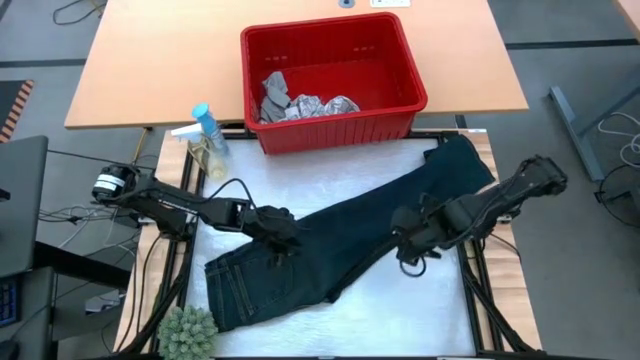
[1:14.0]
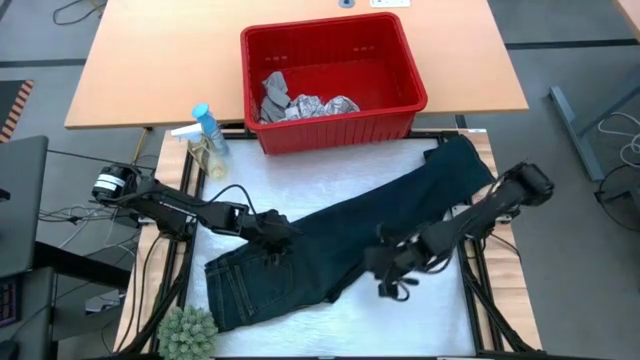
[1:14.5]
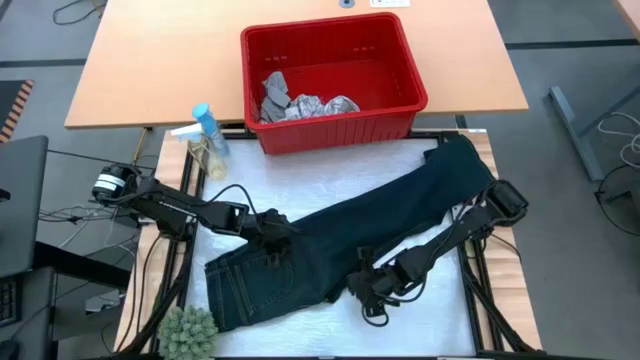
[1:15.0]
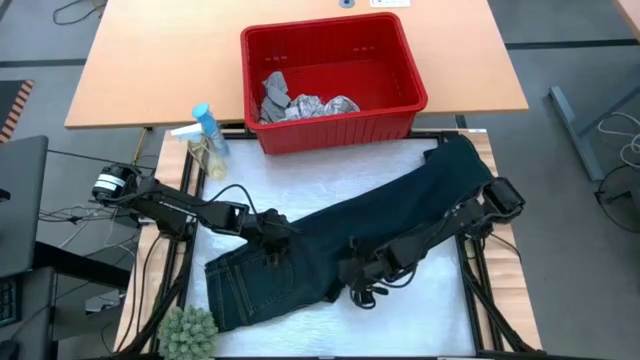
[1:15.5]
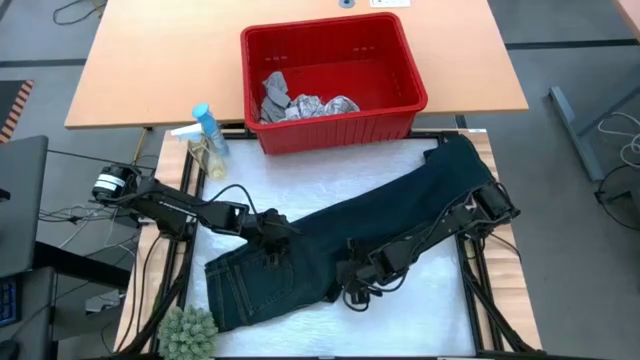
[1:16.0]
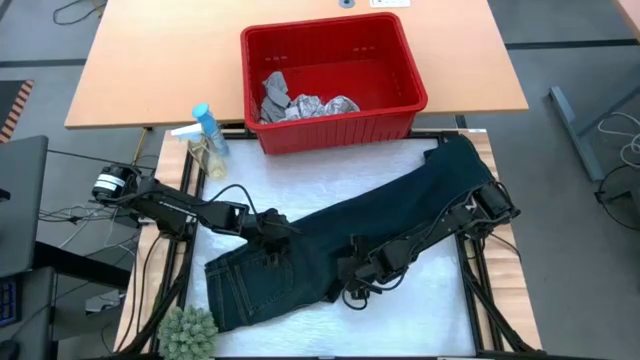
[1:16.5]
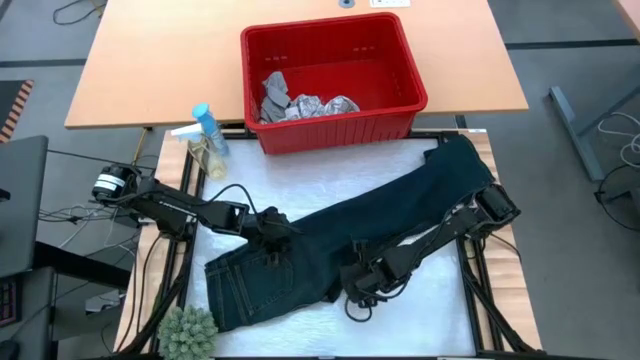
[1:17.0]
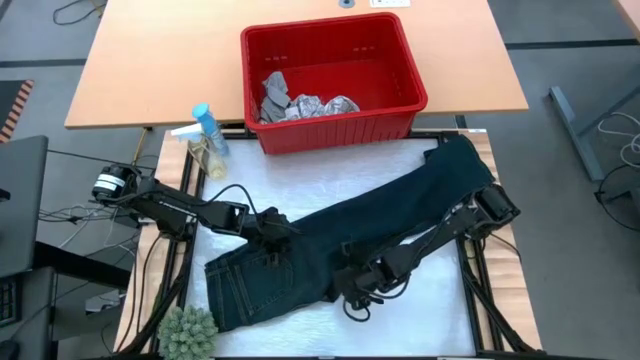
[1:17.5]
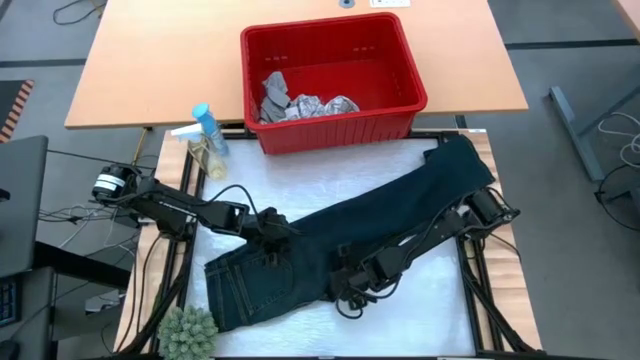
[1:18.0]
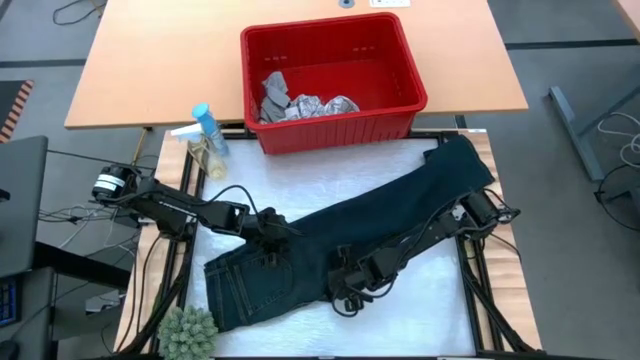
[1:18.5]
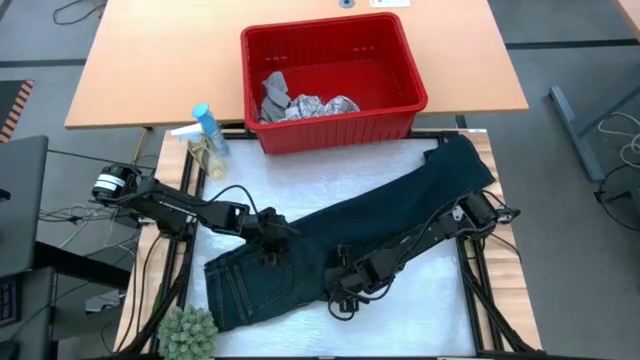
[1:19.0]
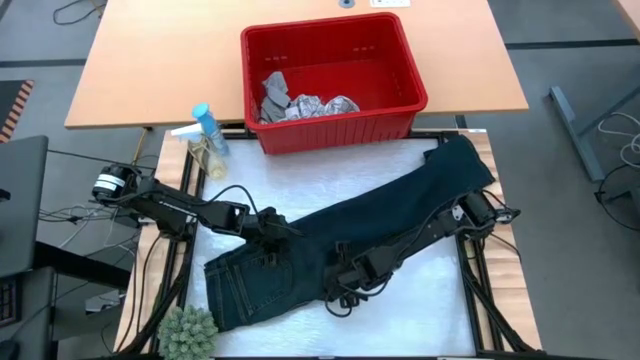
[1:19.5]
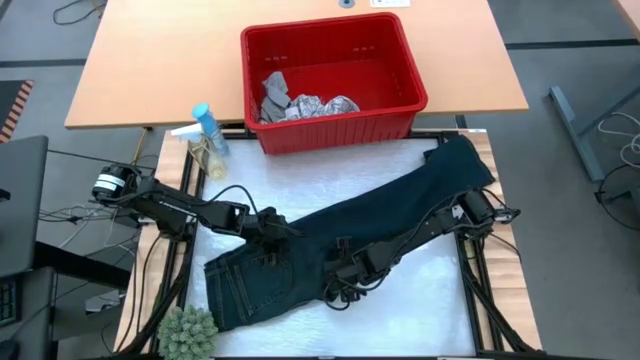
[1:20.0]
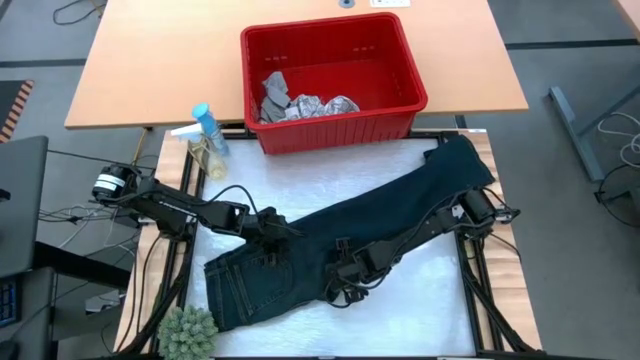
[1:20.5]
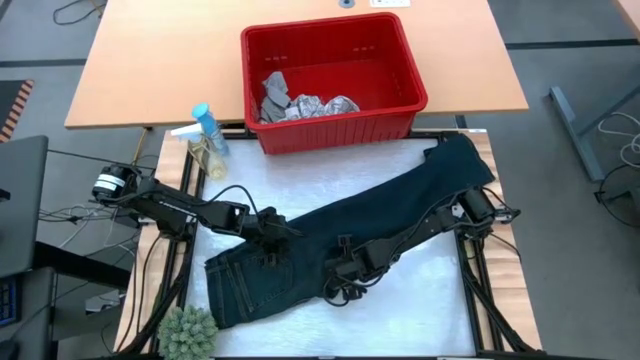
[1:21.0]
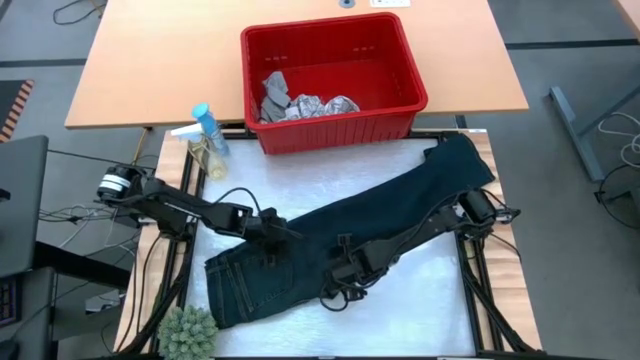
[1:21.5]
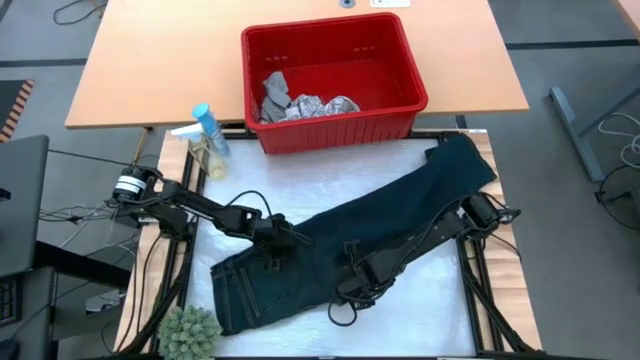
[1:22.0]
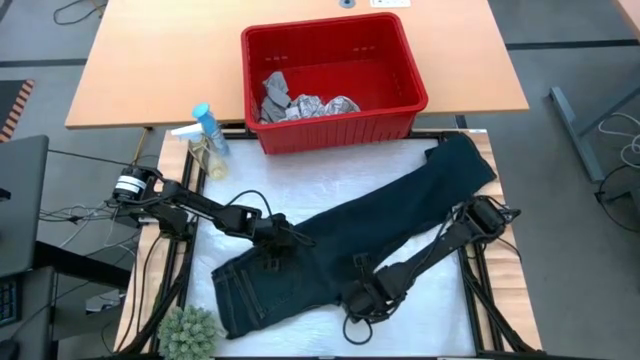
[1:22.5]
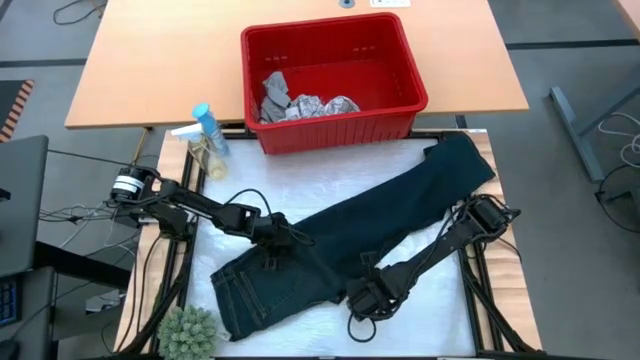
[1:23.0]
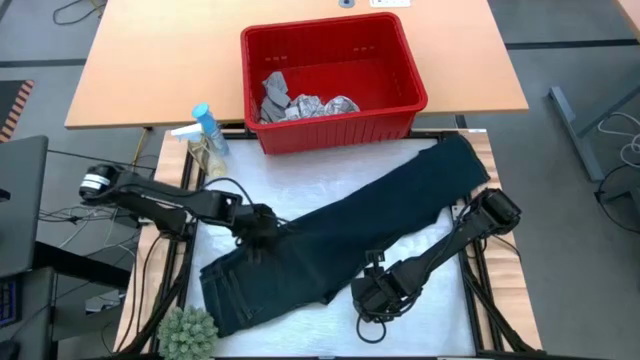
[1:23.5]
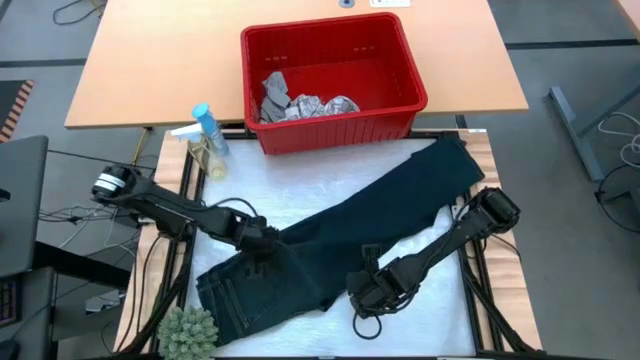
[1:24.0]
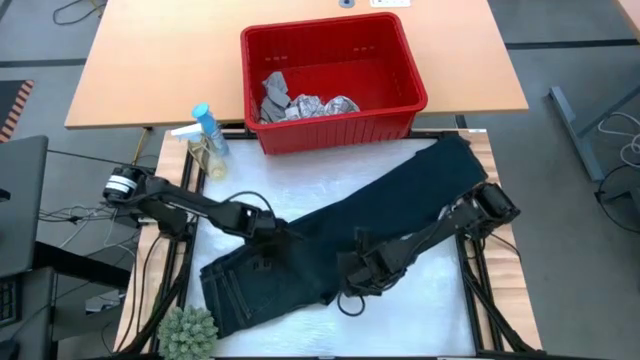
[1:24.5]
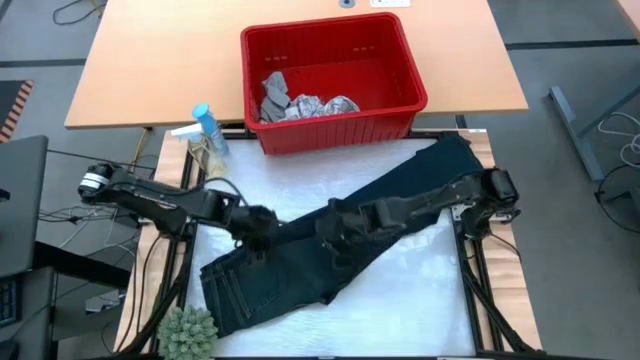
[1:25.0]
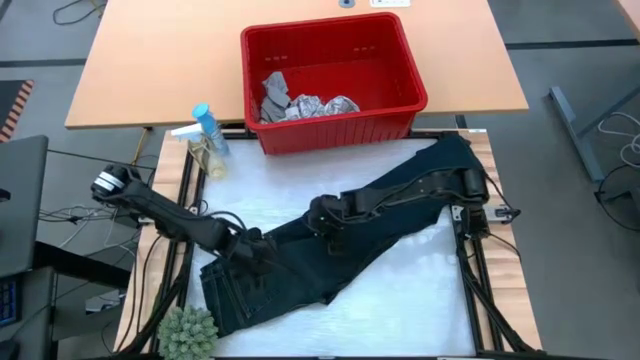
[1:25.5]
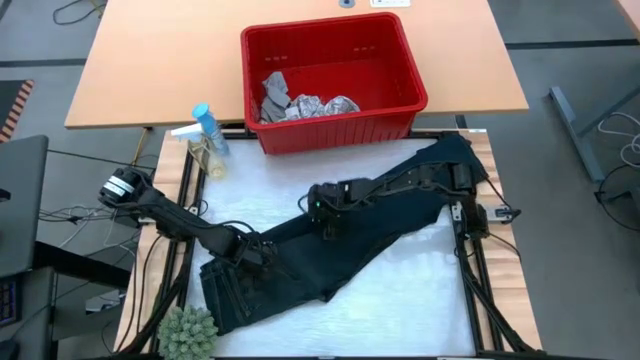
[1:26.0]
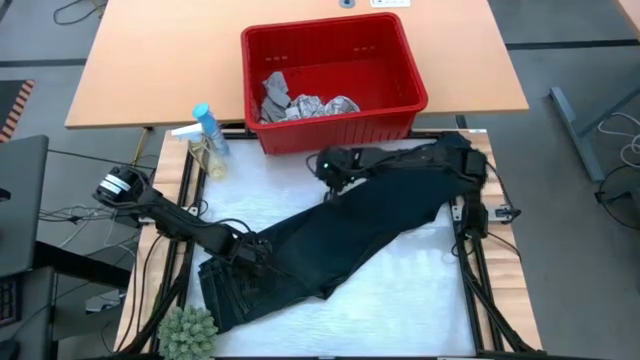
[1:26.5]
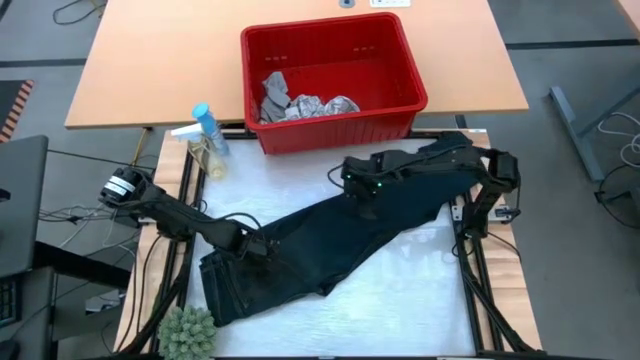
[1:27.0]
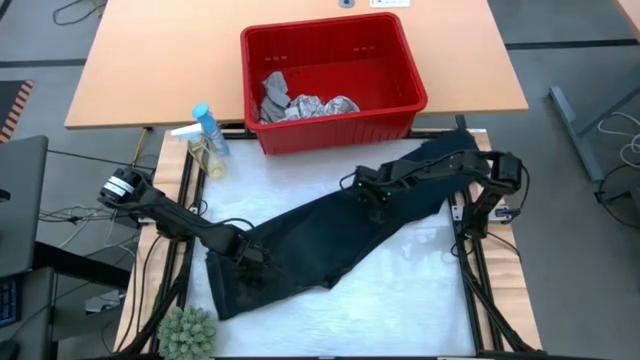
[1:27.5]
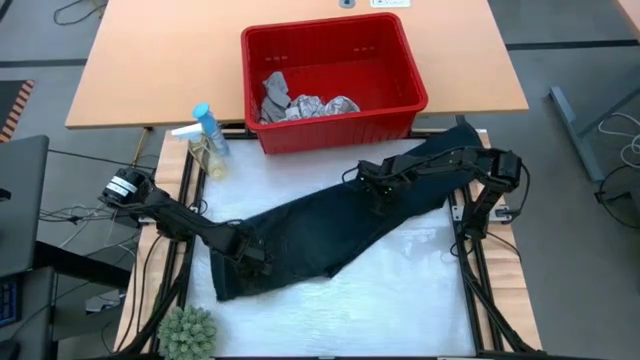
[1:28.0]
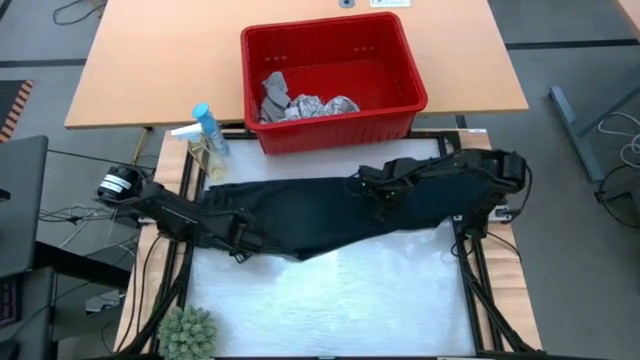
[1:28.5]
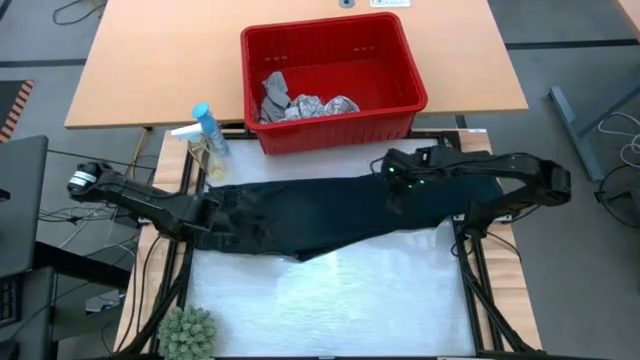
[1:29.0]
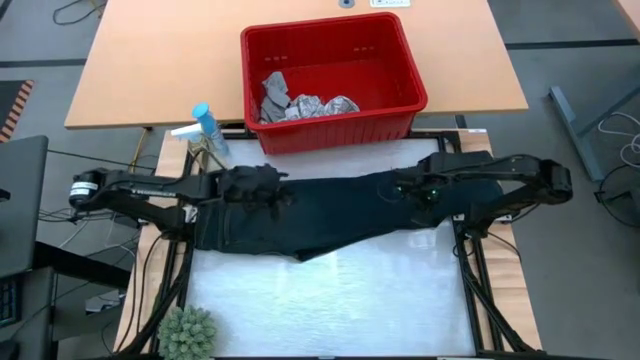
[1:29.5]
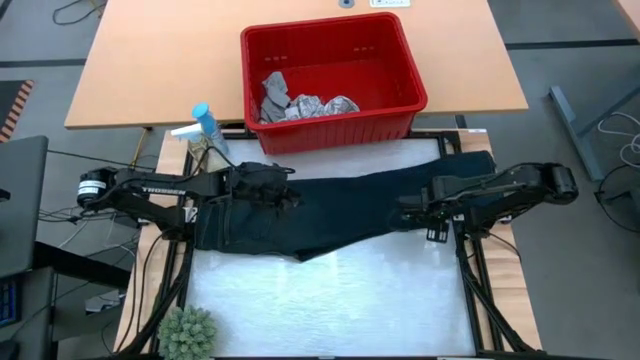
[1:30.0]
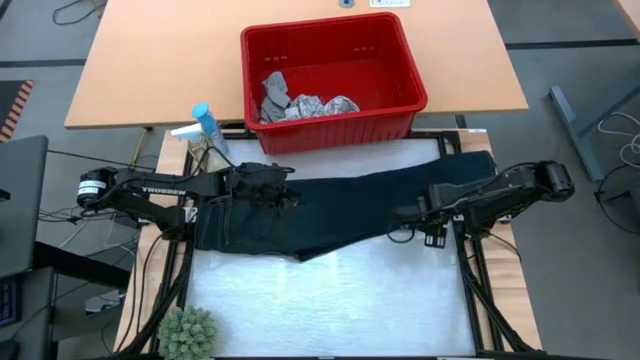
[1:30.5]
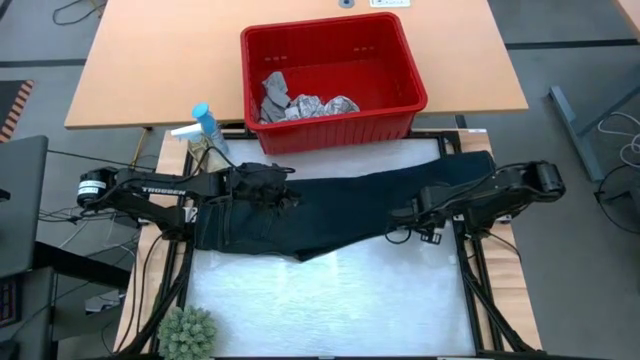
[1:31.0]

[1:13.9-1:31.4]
Task: Fold Laundry from Bin
Fold the blue jeans
